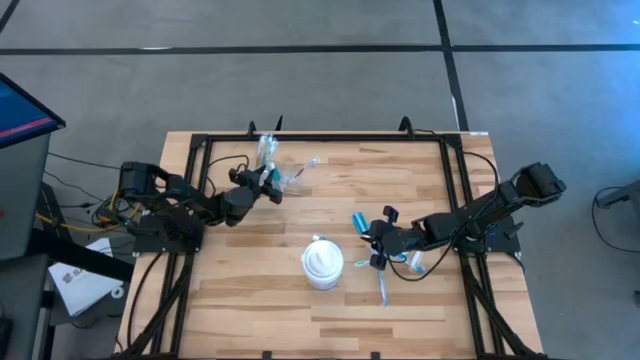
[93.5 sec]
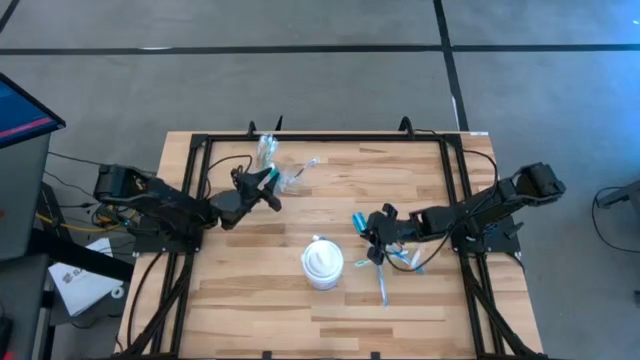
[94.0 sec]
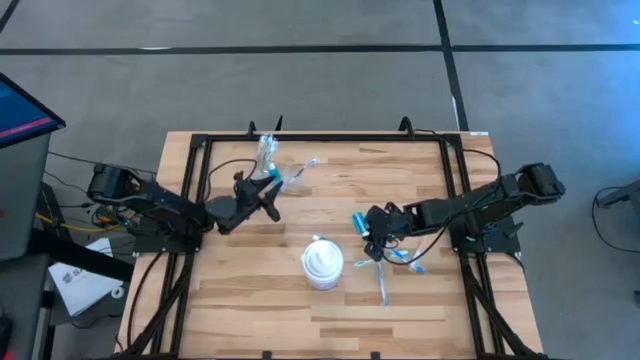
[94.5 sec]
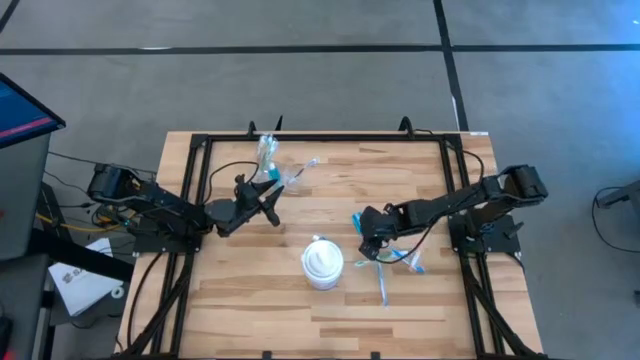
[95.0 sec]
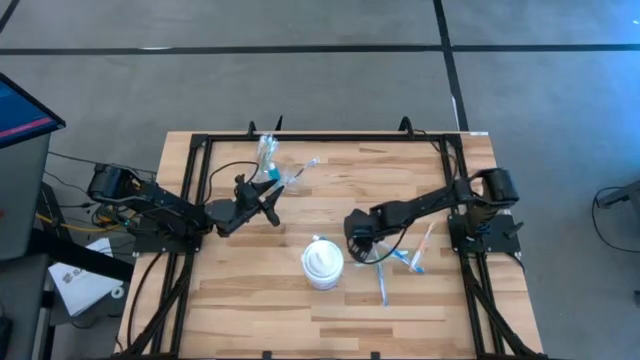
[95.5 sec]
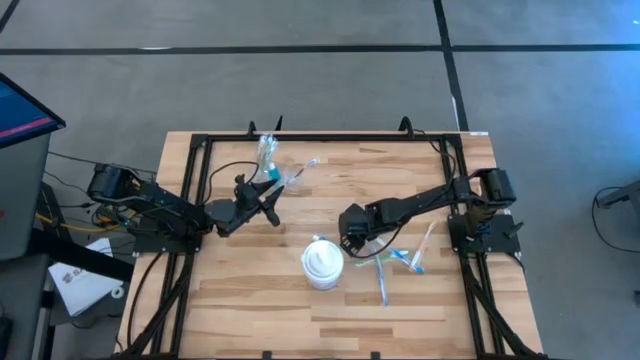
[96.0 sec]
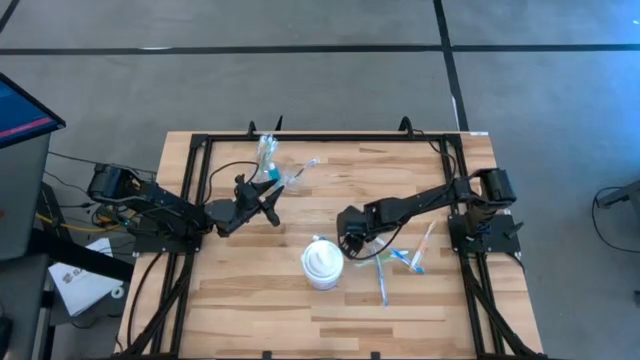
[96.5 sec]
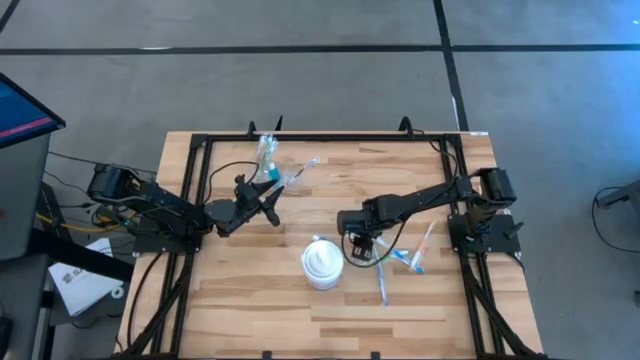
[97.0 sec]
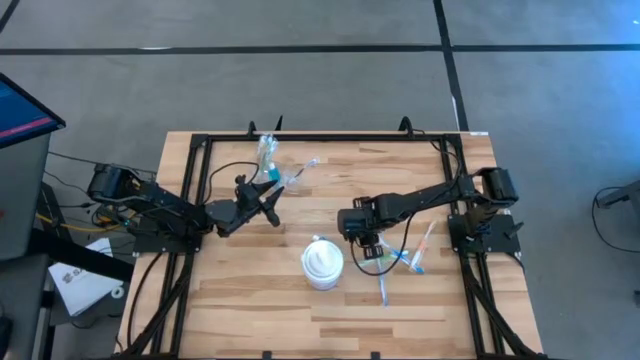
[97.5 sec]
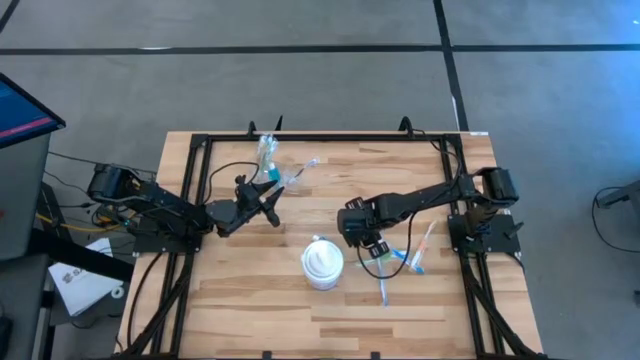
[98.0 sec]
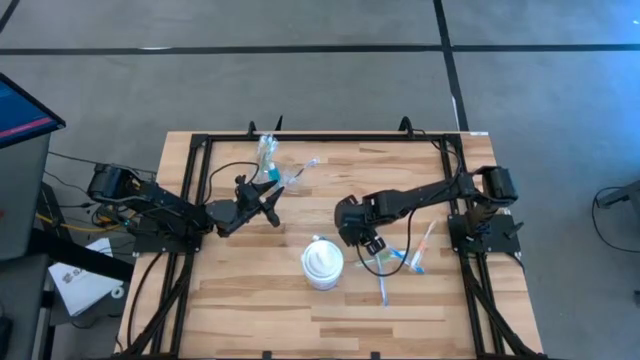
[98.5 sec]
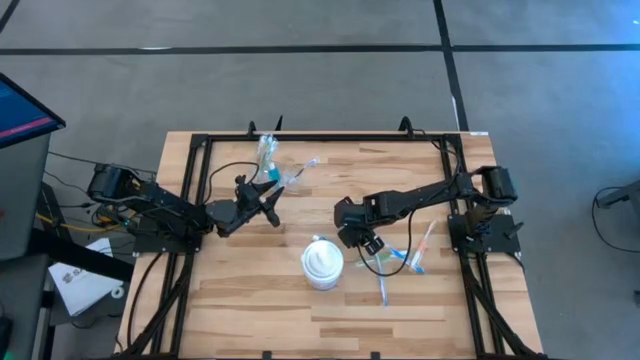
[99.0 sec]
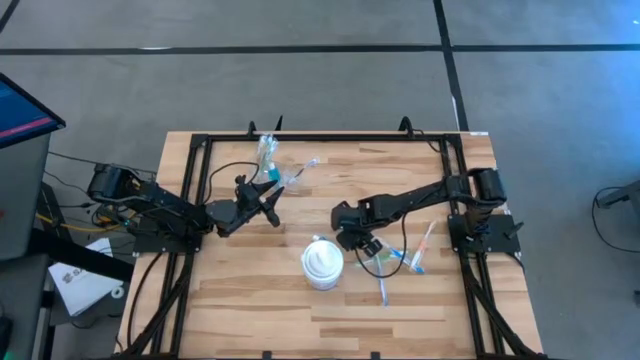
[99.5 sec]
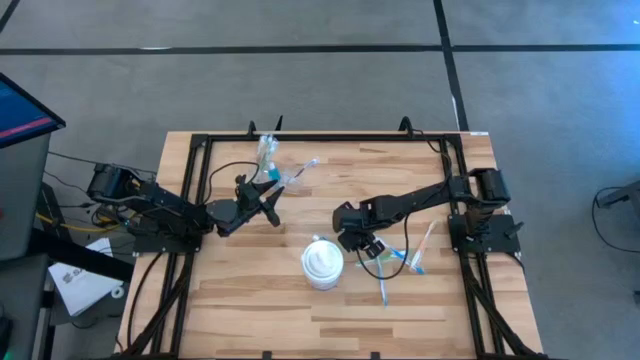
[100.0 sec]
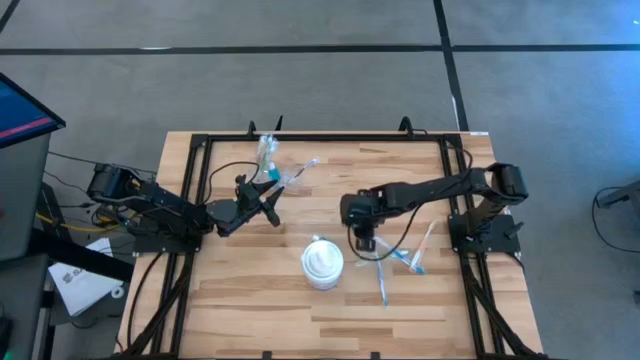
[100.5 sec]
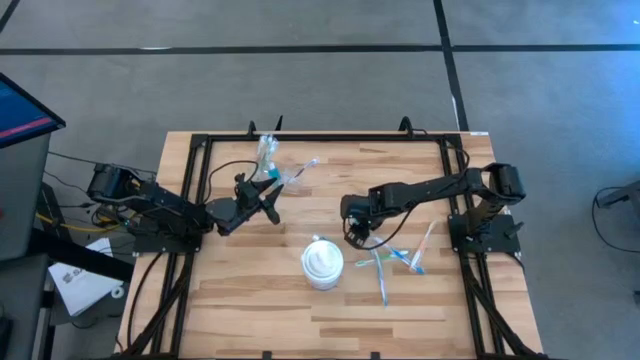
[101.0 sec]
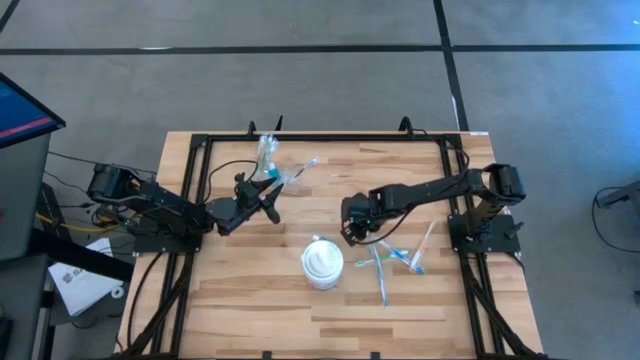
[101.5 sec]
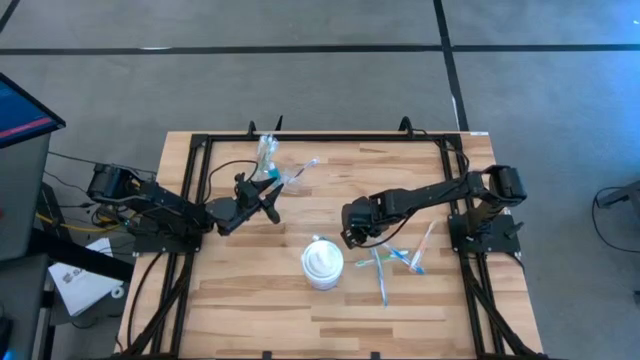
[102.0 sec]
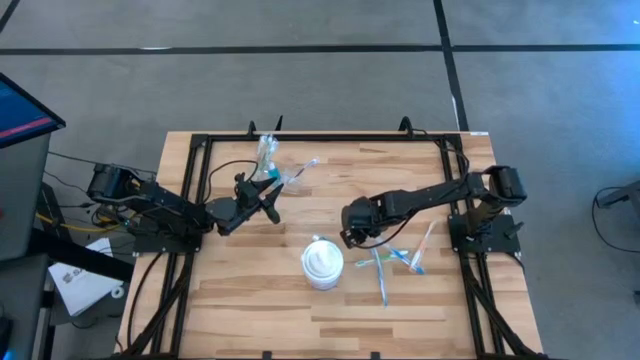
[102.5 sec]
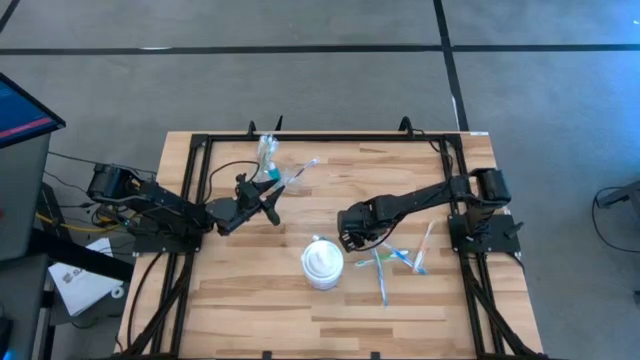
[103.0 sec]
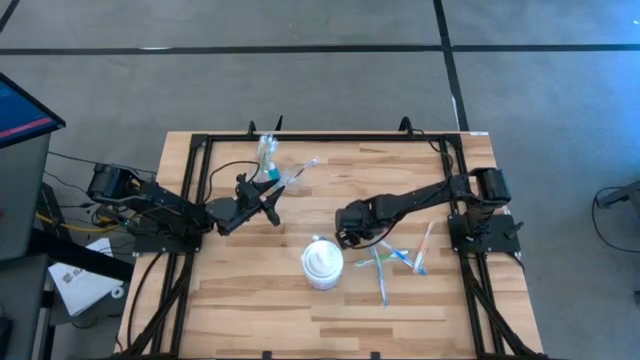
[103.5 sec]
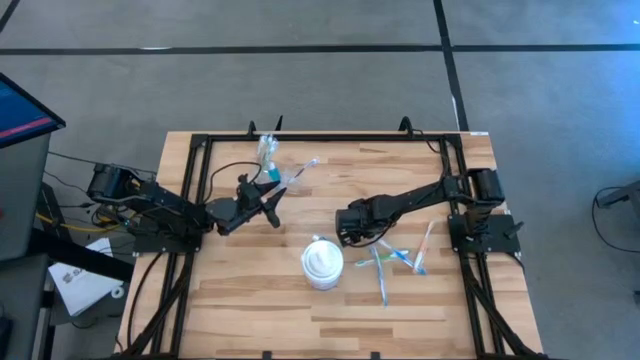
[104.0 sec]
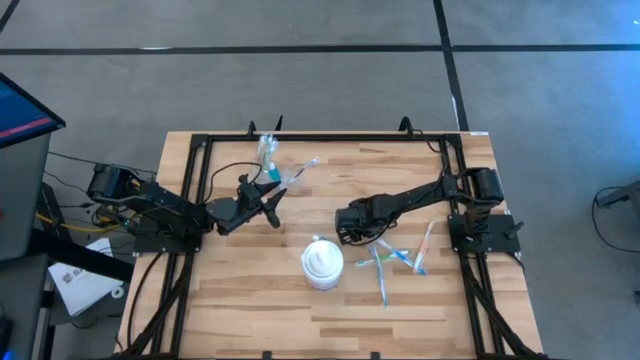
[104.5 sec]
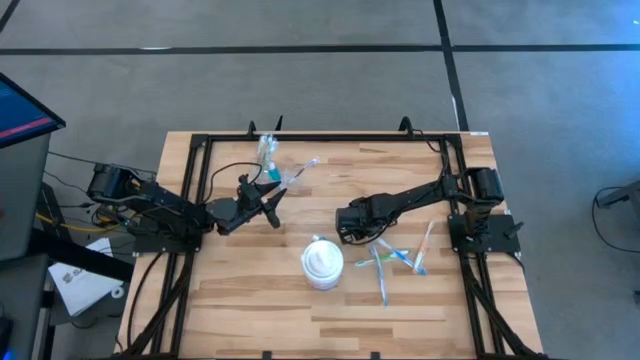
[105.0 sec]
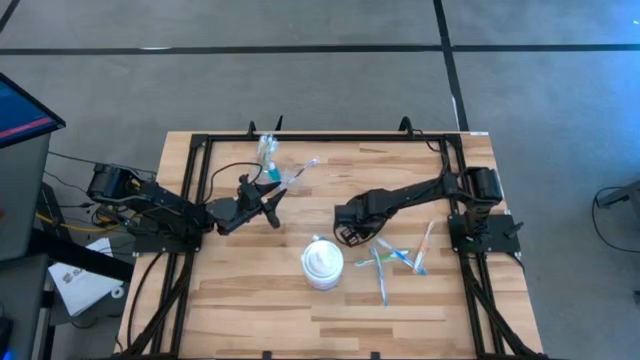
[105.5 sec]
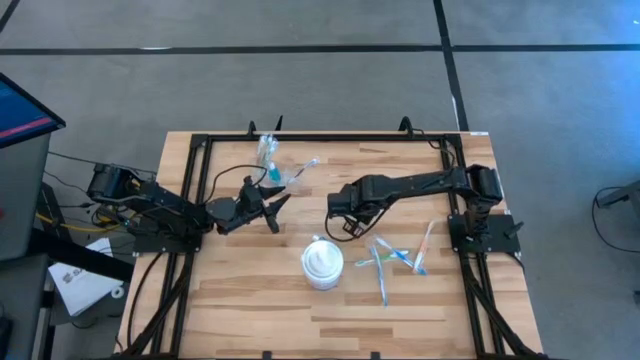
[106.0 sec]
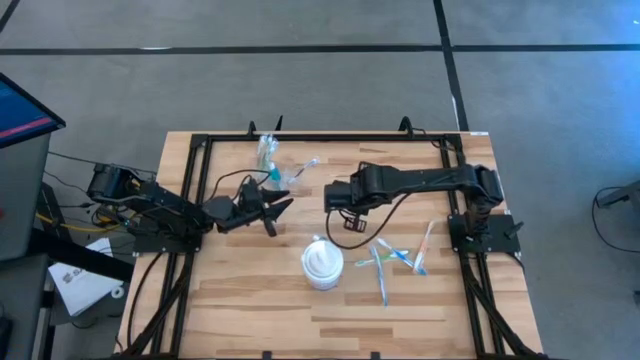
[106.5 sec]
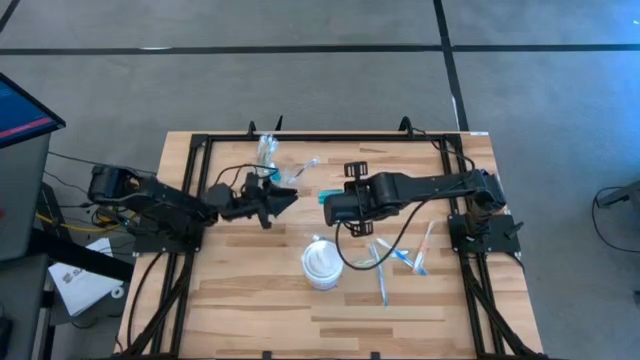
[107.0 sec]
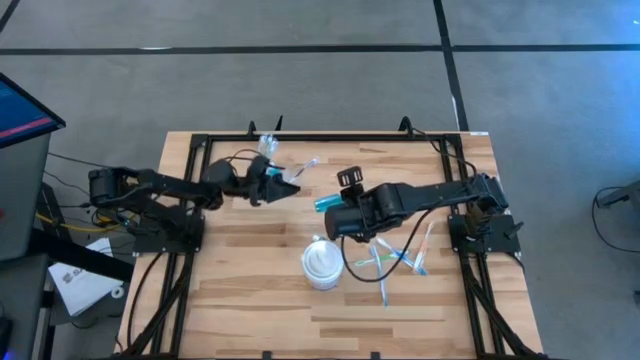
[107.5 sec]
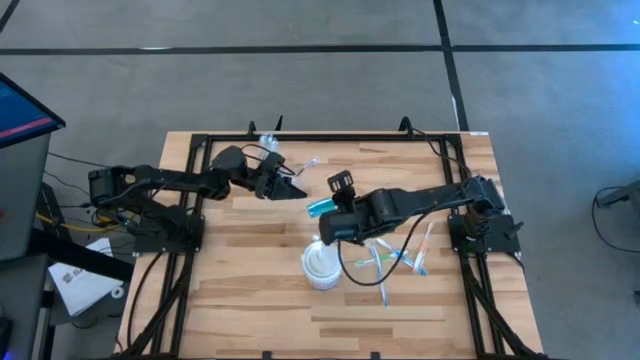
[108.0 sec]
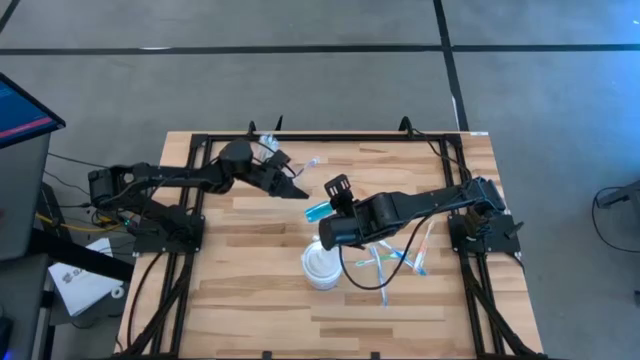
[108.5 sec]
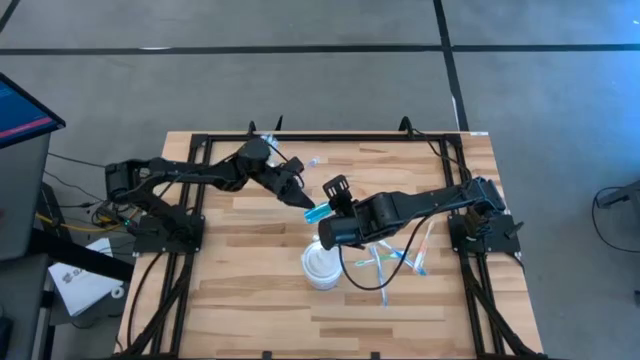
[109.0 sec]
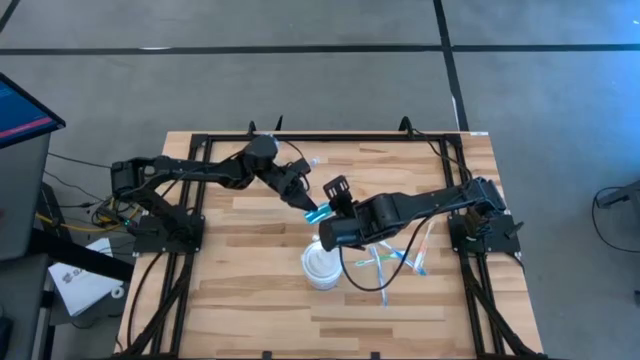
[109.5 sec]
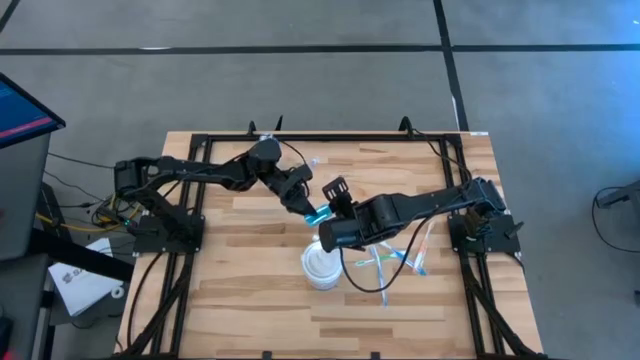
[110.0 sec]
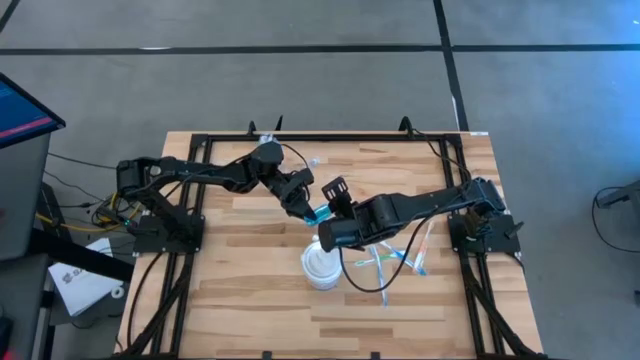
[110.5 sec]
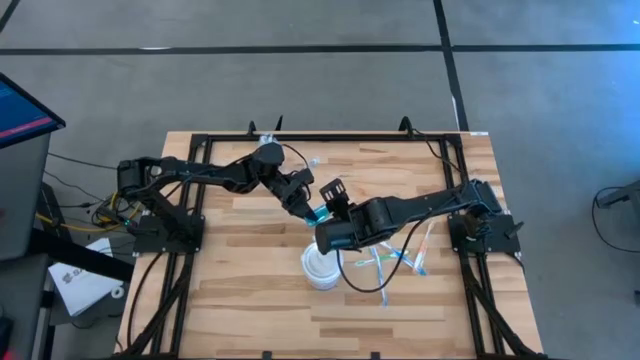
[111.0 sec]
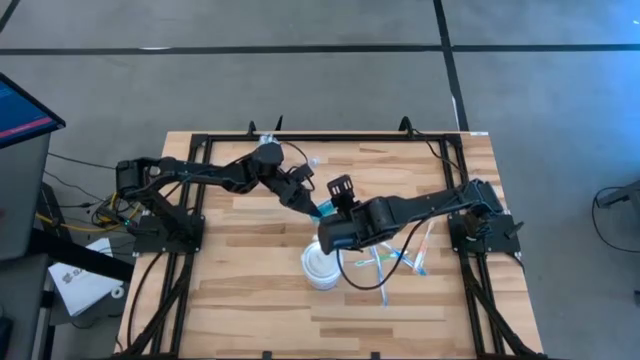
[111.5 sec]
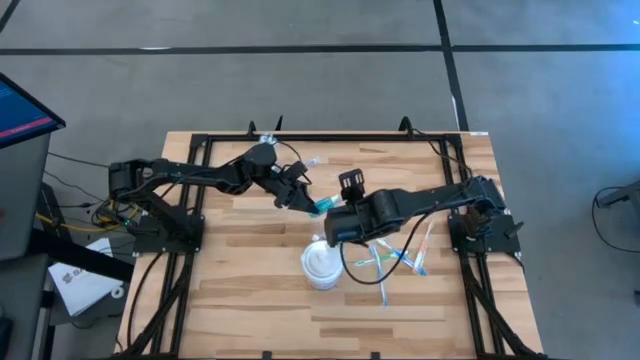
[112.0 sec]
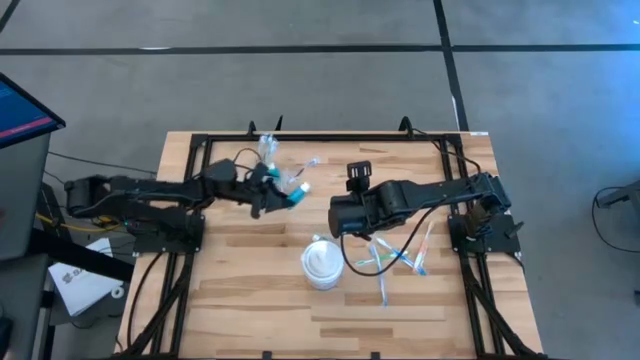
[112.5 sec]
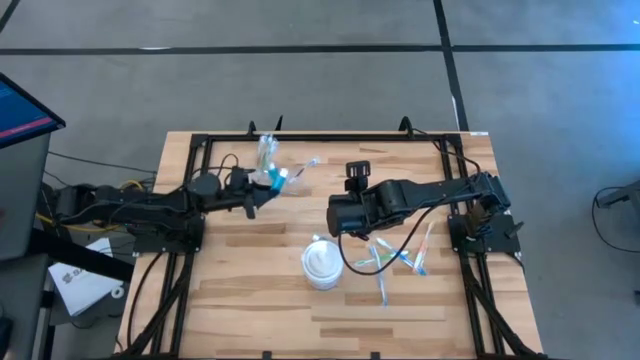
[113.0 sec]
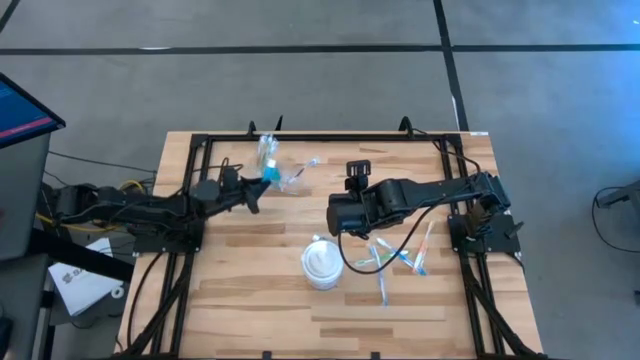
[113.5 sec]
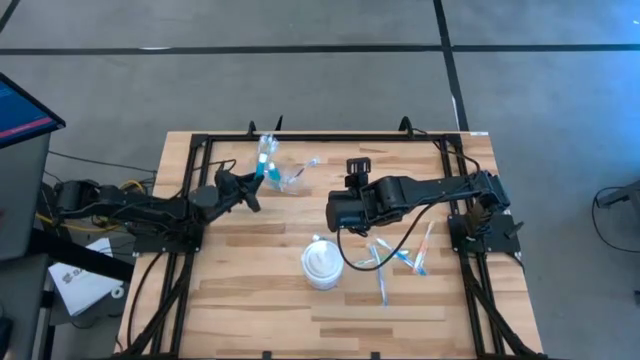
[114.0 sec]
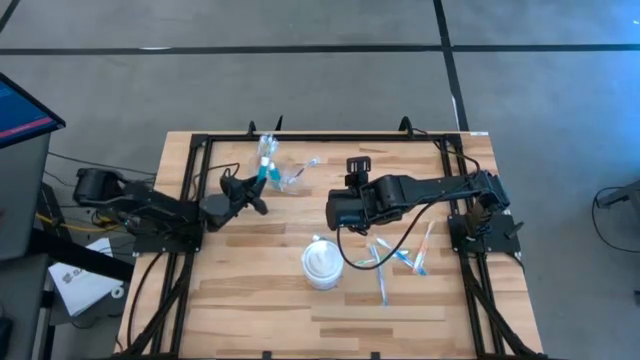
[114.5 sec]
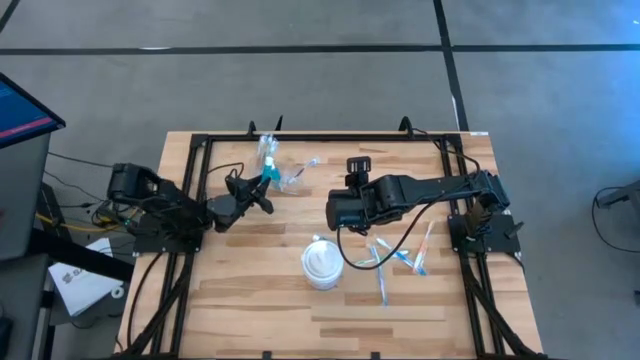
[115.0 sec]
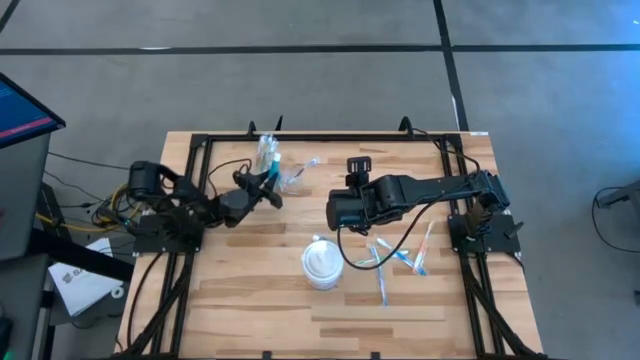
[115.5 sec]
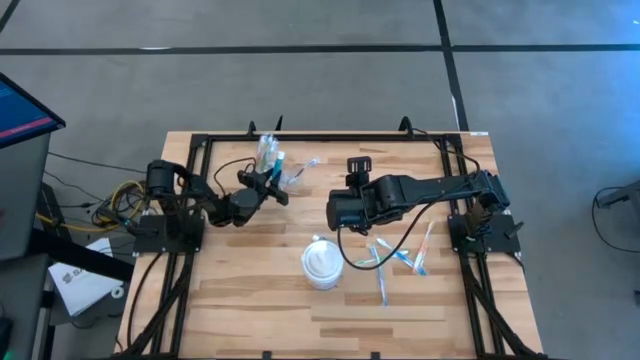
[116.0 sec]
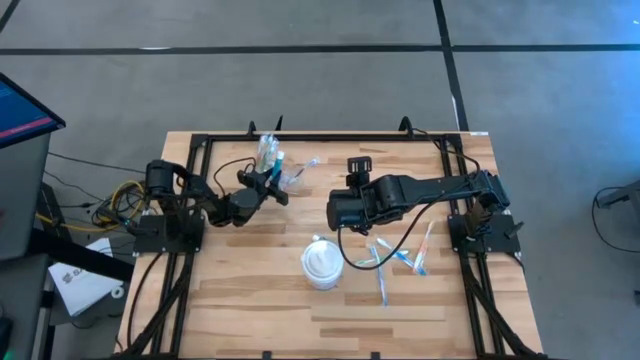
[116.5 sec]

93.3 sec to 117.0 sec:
Task: Pick & Place toothbrushing station
Put the right blue mouthwash into the transparent organizer
